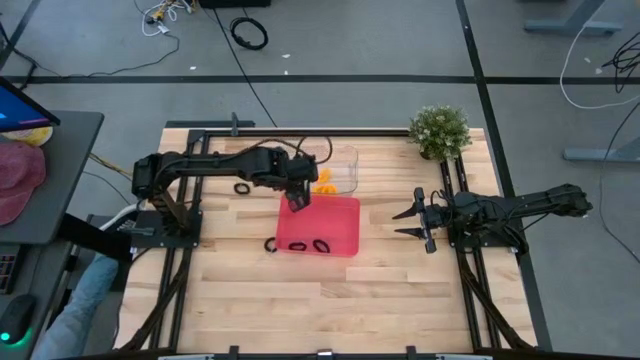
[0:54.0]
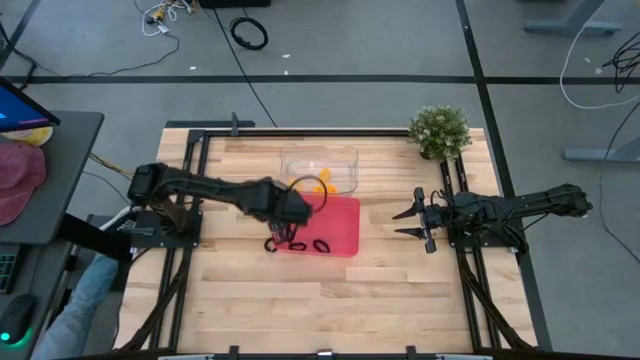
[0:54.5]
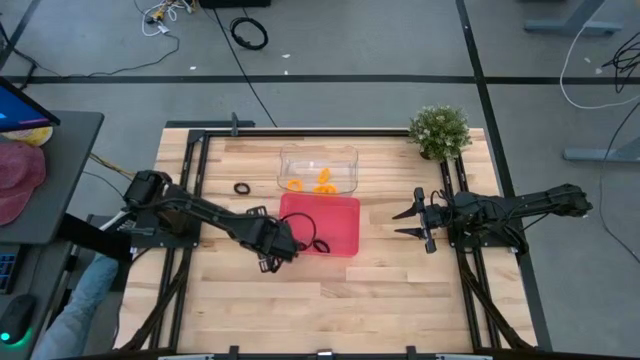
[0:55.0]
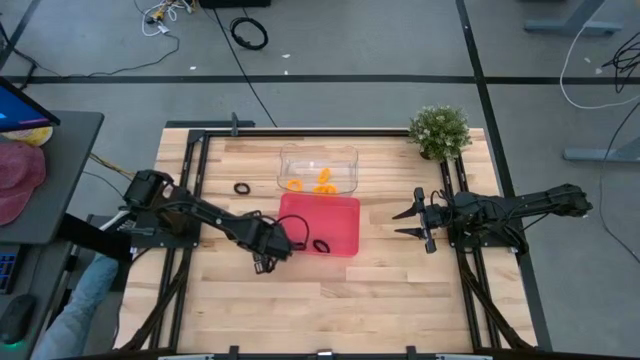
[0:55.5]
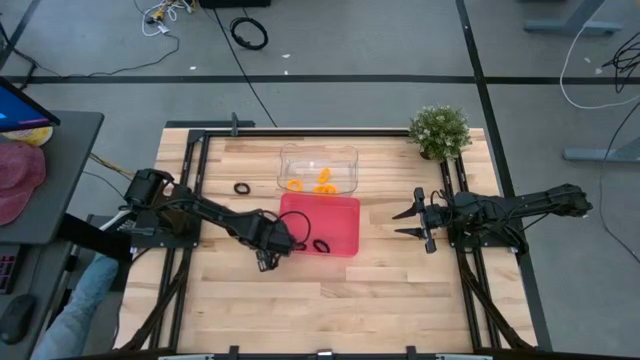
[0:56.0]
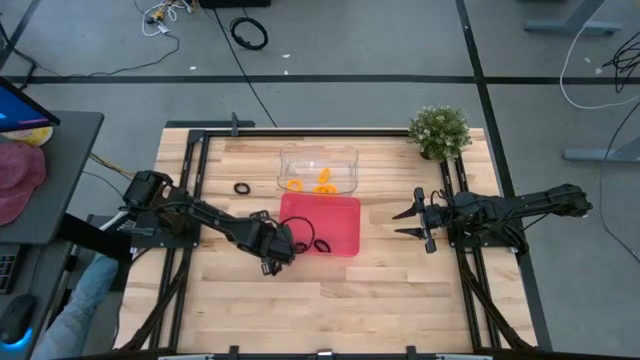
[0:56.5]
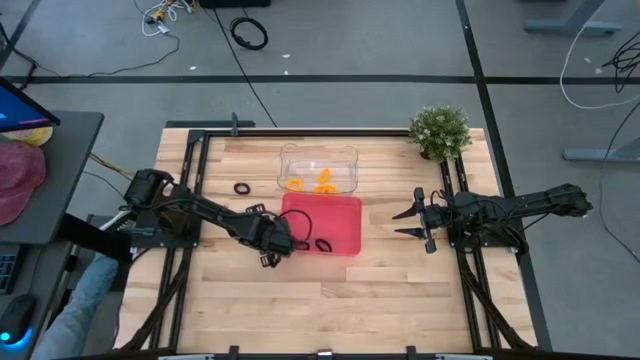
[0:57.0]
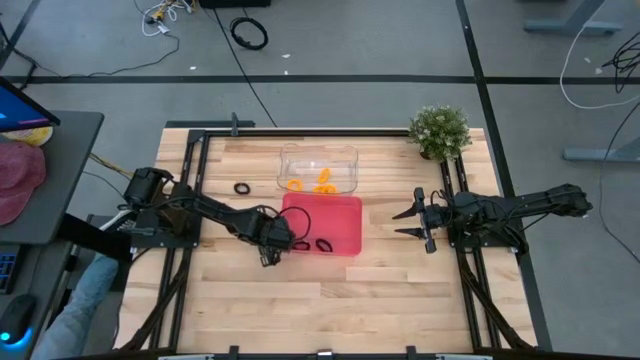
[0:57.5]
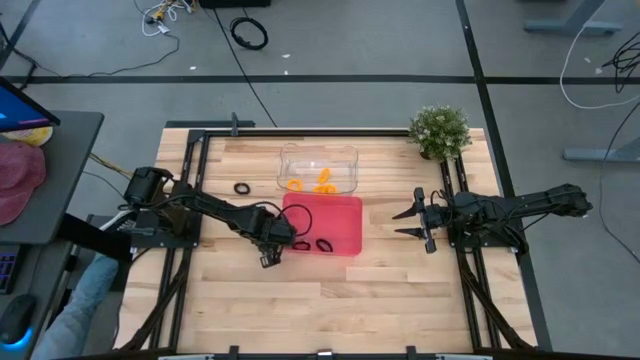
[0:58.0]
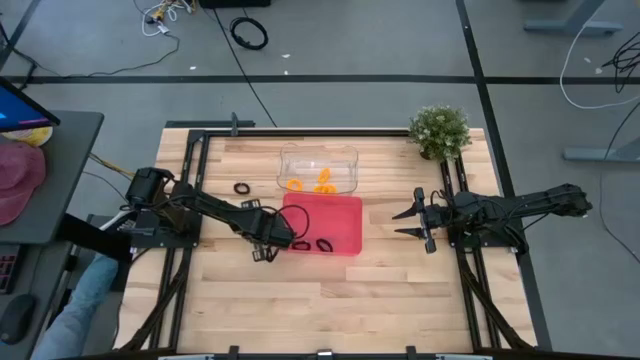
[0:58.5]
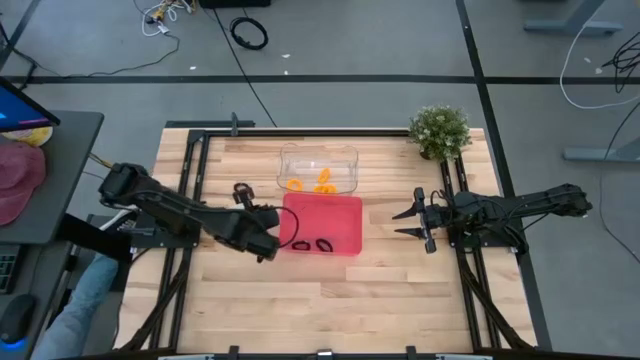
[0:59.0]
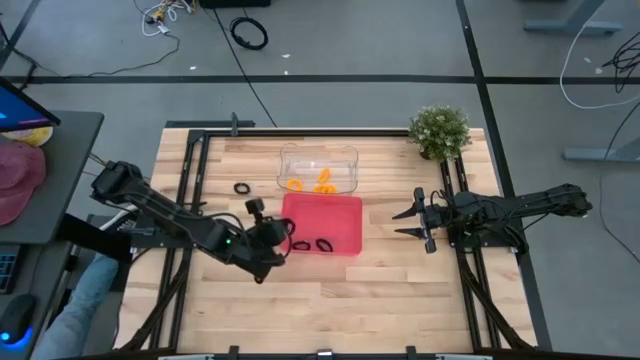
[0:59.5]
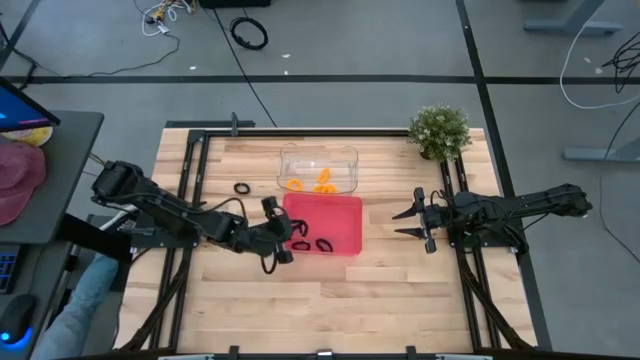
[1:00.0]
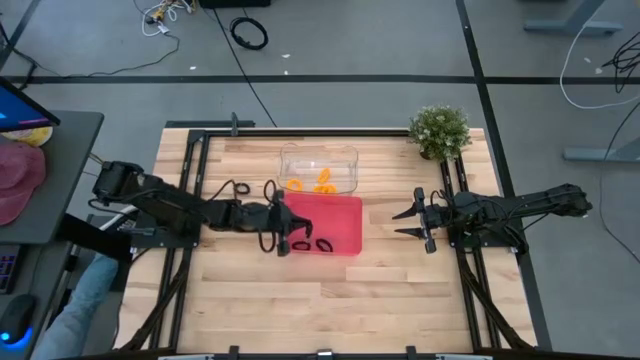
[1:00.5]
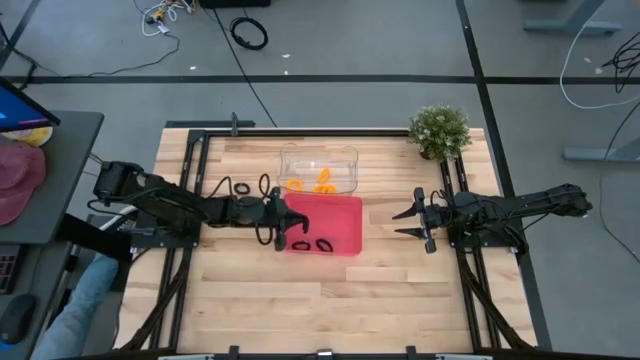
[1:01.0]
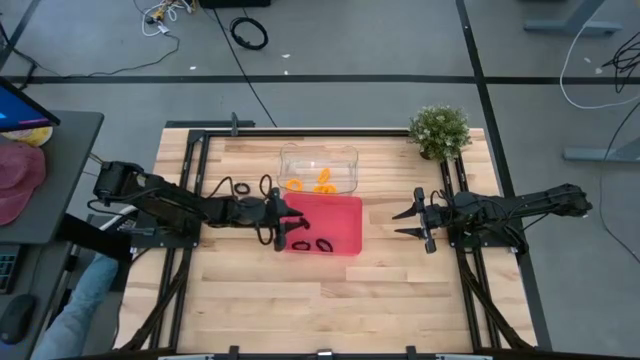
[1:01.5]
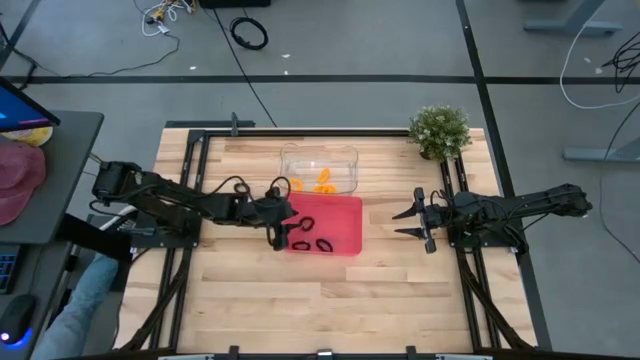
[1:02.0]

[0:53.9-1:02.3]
Task: Sort spring keychains
Put the black spring keychain into the red bin

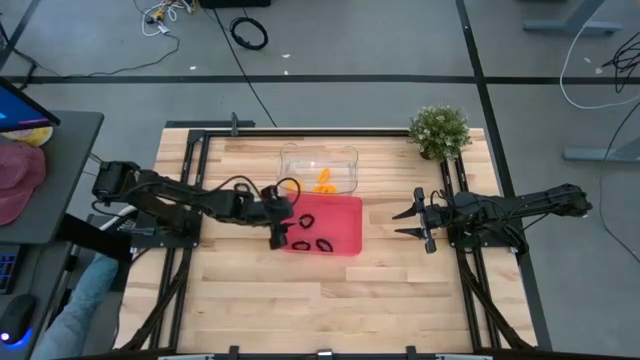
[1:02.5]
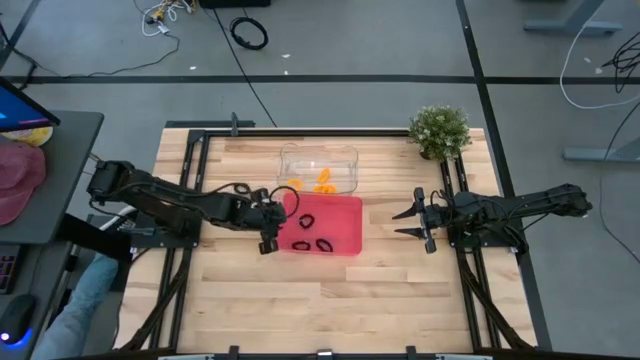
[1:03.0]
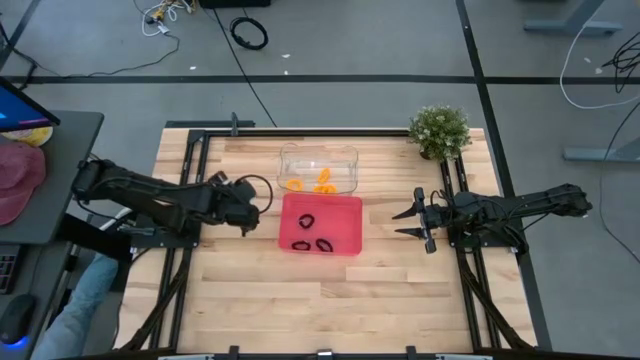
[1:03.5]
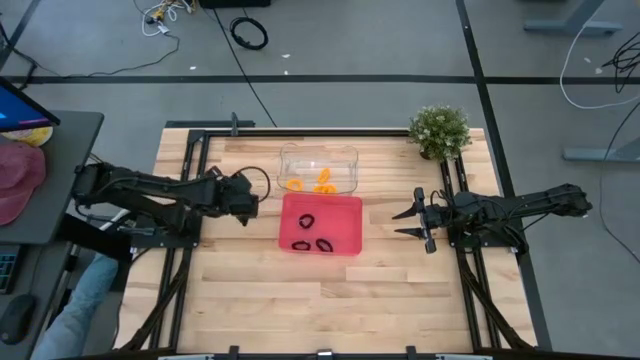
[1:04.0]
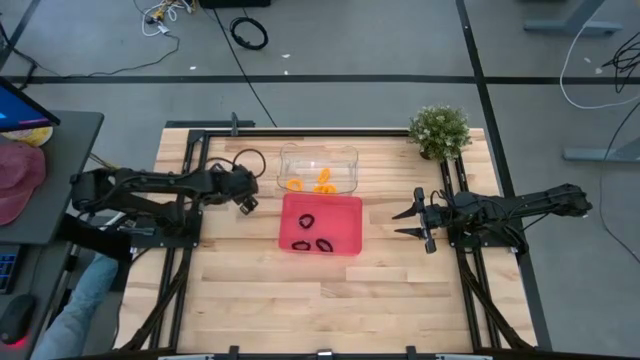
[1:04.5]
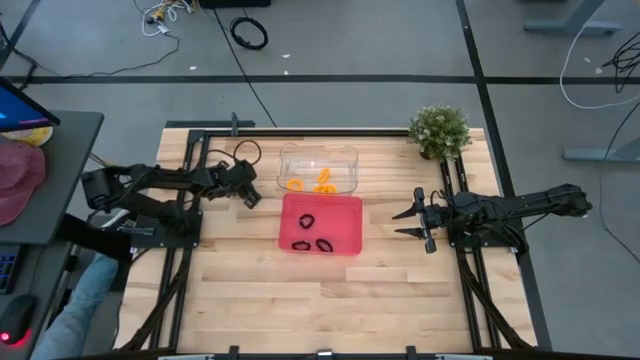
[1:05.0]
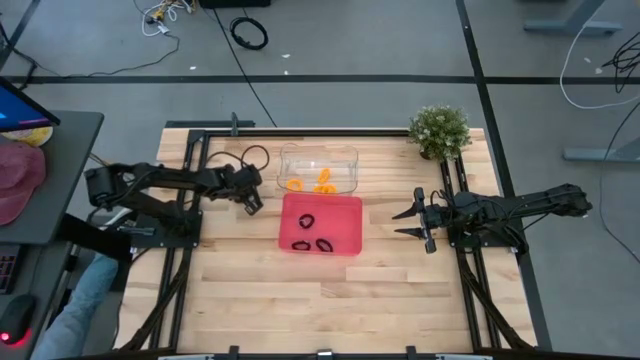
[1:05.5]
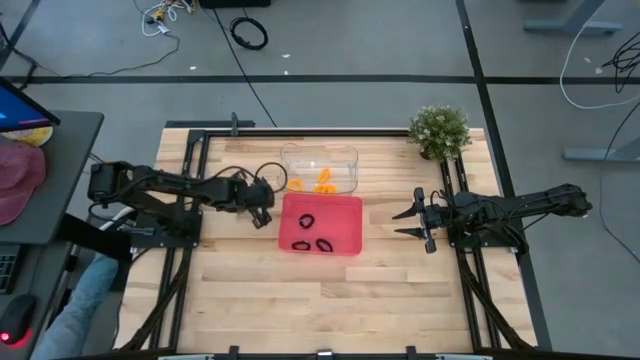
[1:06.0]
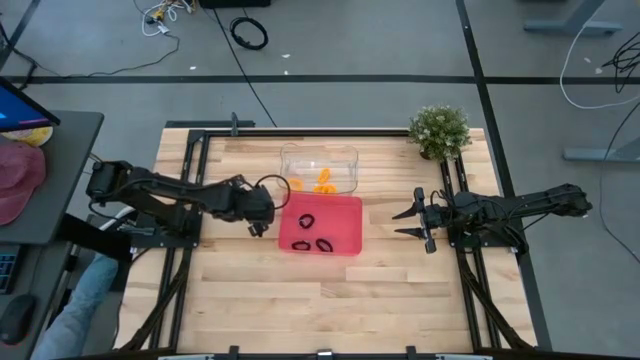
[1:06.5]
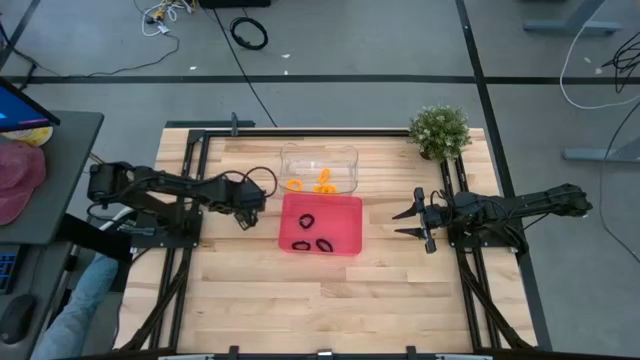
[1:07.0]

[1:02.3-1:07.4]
Put the black spring keychain into the red bin

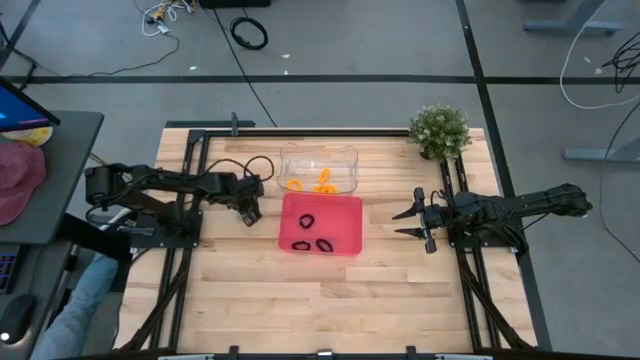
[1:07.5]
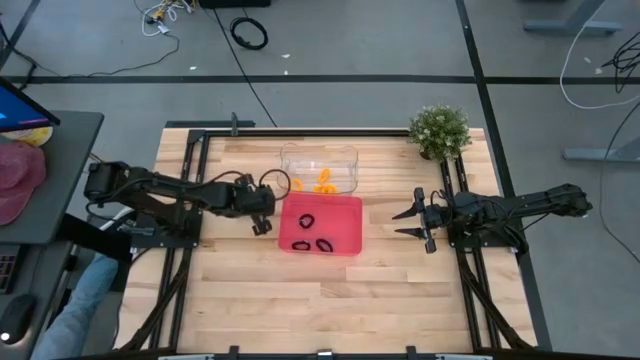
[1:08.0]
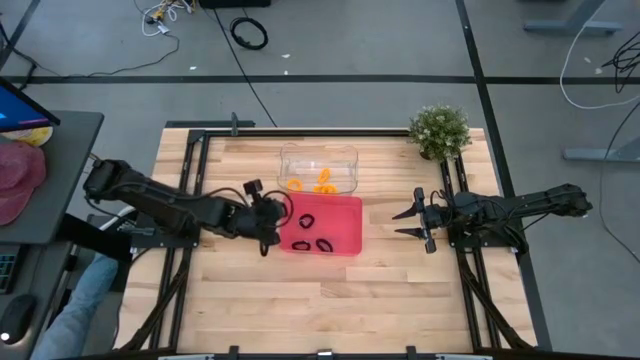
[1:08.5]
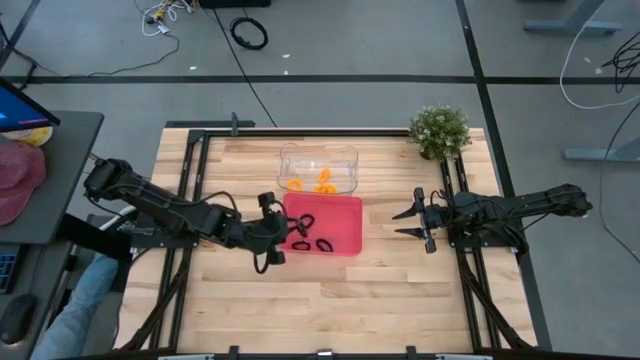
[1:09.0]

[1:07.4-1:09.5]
Put the black spring keychain into the red bin

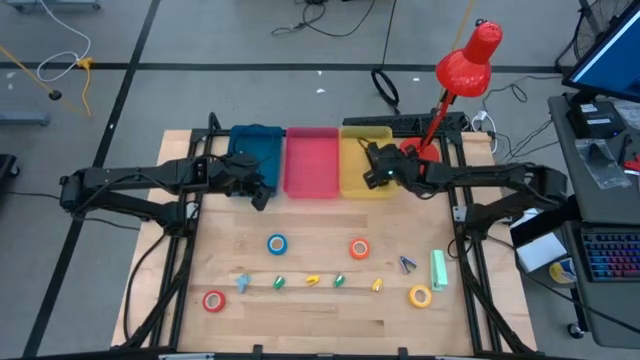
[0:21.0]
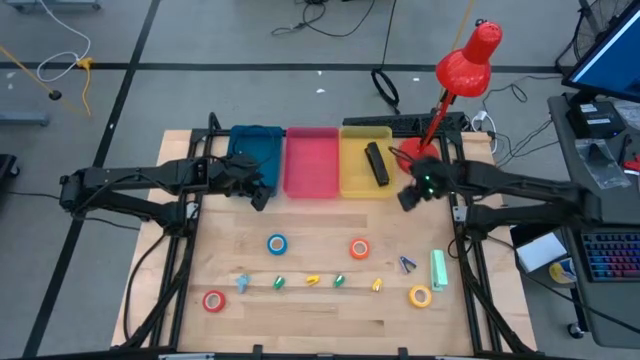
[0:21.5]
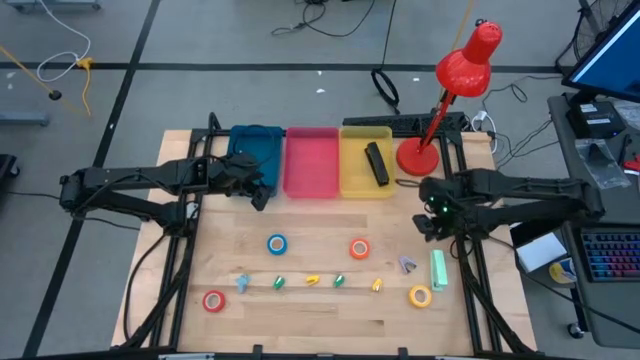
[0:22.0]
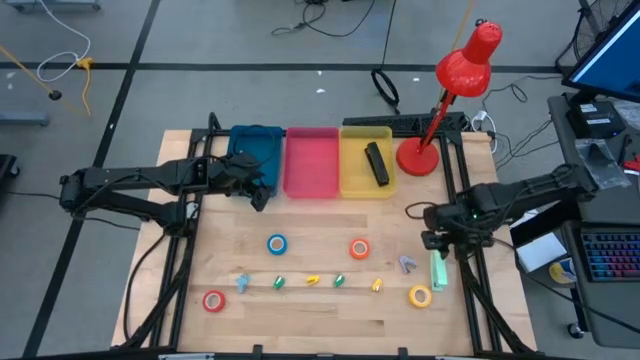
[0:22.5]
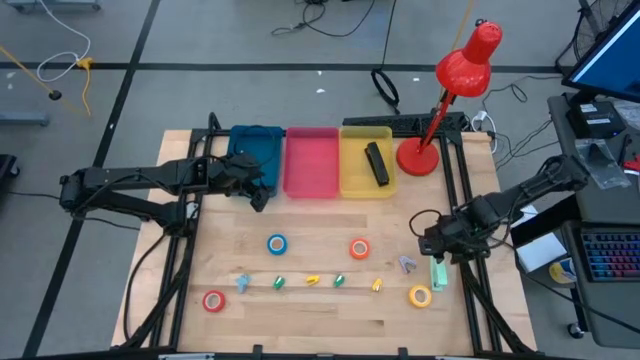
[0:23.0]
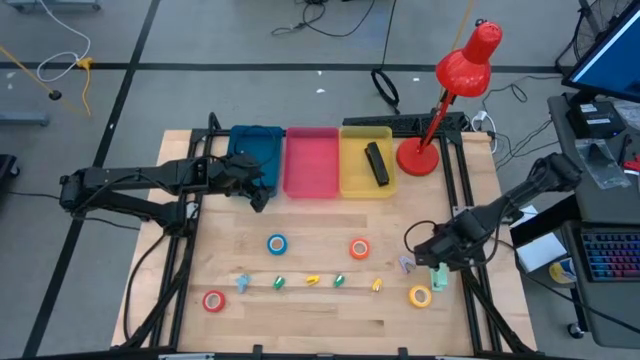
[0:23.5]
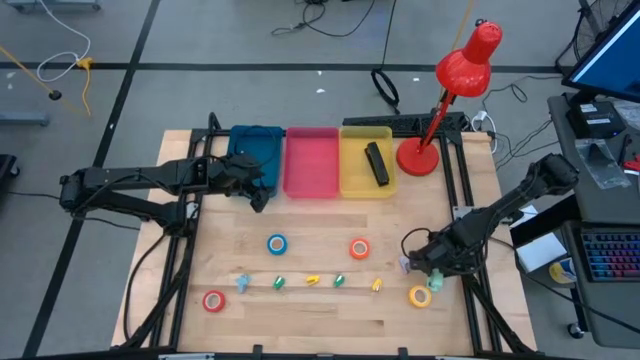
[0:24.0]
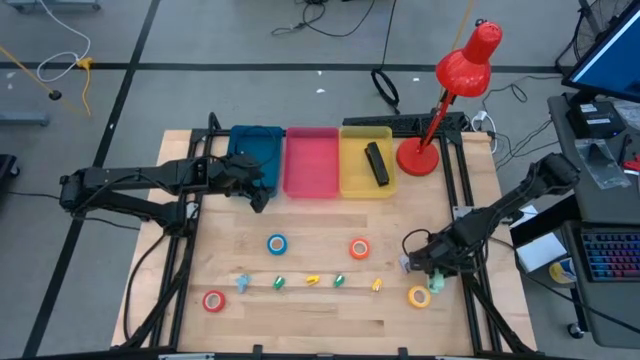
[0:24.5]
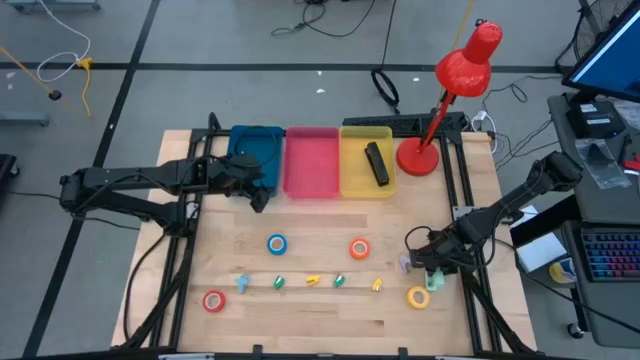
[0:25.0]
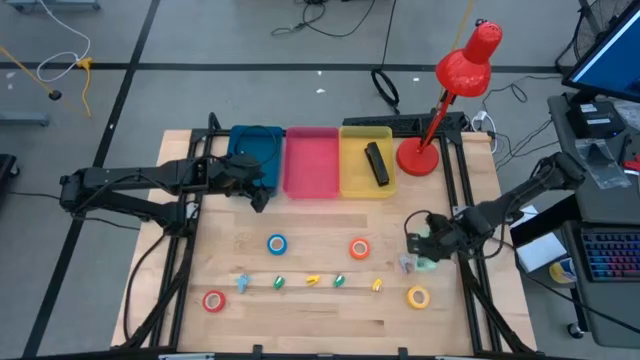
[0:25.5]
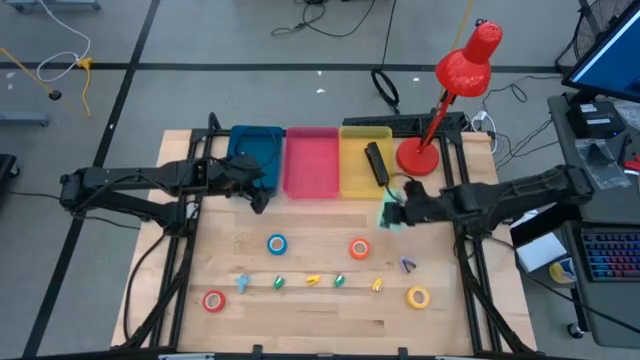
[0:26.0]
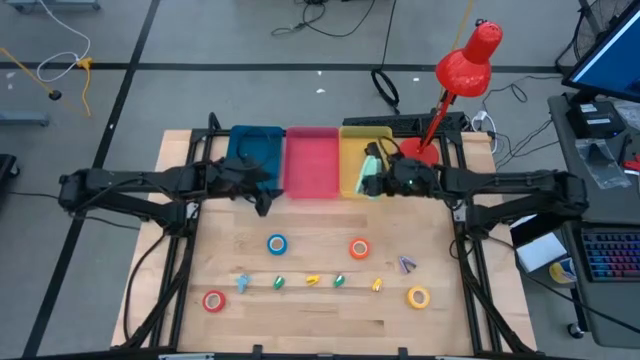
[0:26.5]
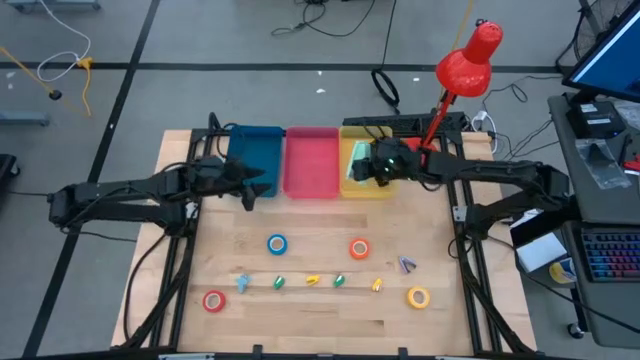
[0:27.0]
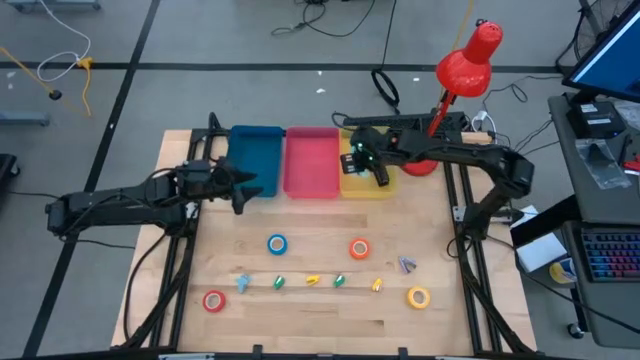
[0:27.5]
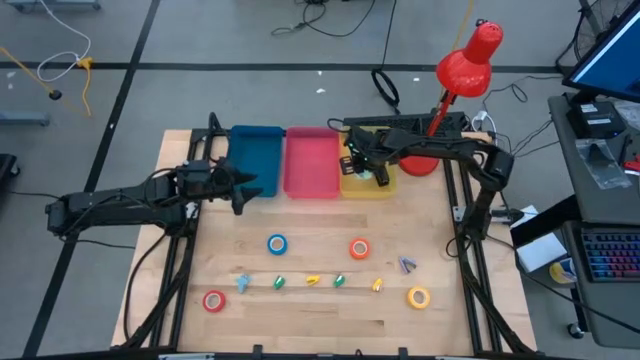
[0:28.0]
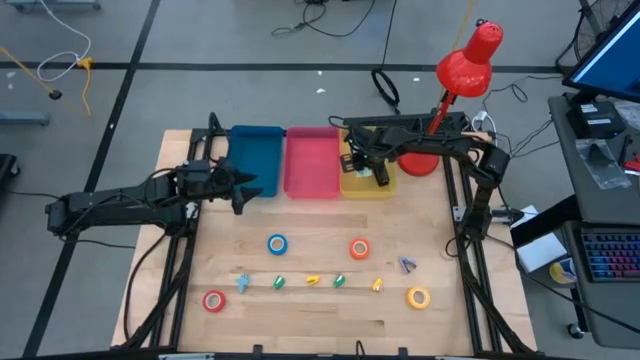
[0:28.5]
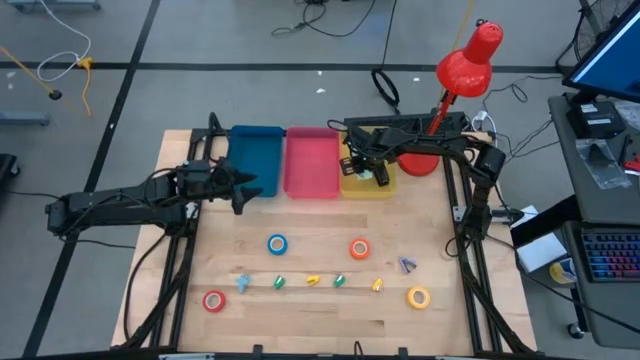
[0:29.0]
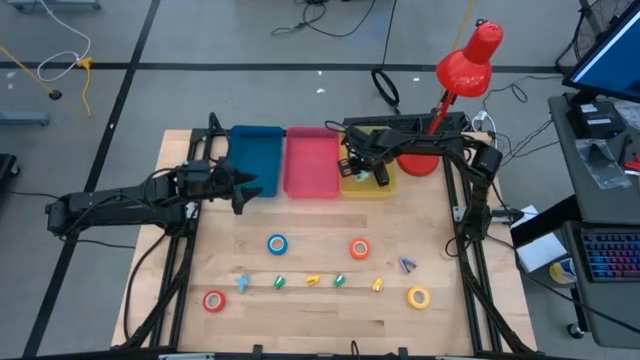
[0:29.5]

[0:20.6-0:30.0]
Task: Pick and place Stapler, Stapler remover, tape
Put the blue stapler into the yellow bin
